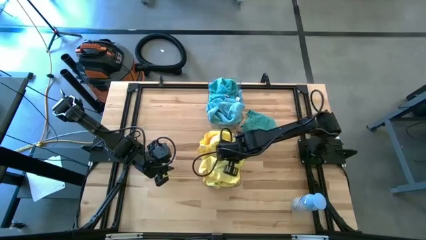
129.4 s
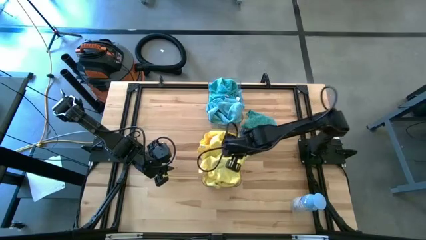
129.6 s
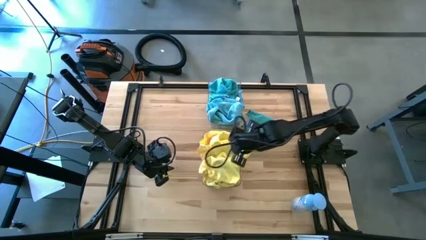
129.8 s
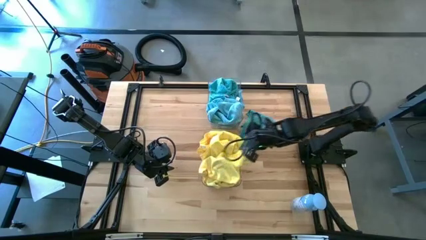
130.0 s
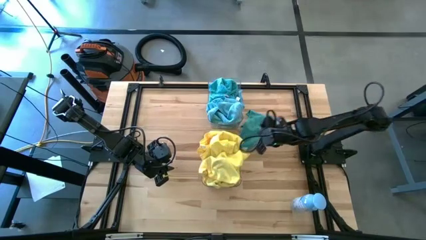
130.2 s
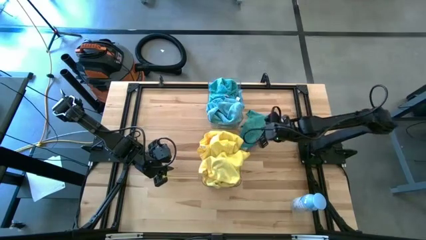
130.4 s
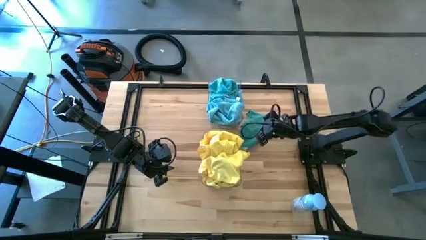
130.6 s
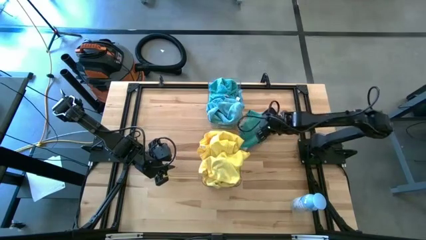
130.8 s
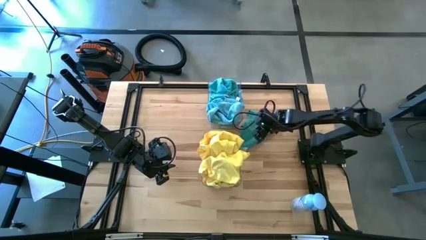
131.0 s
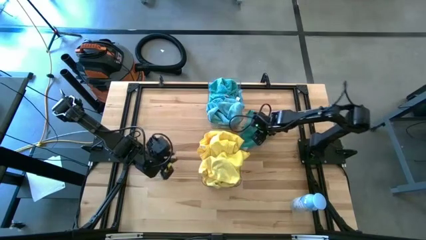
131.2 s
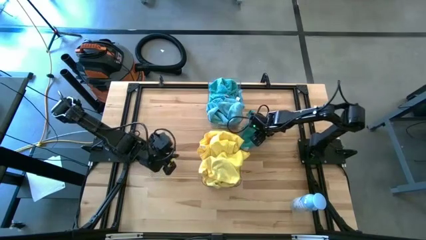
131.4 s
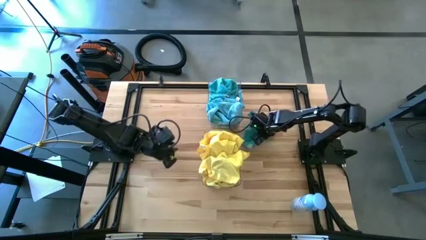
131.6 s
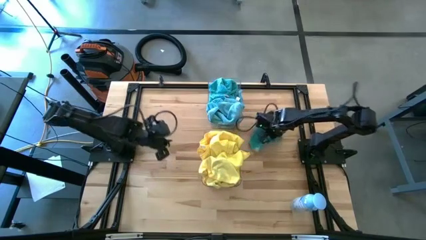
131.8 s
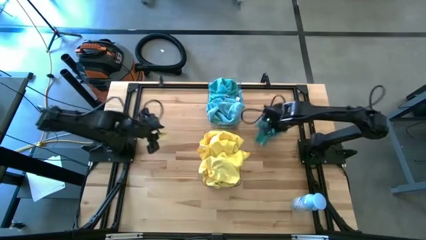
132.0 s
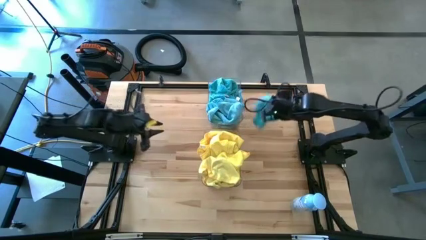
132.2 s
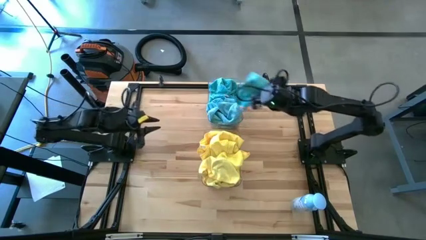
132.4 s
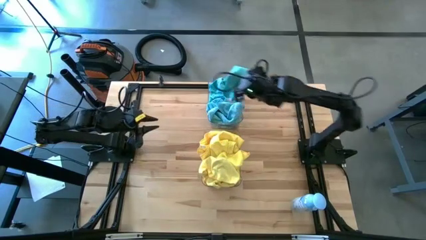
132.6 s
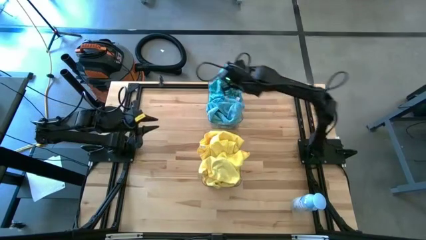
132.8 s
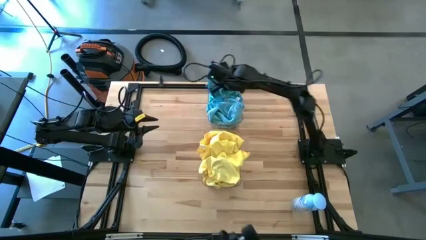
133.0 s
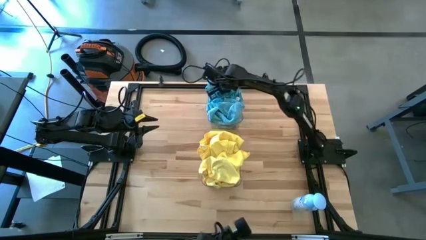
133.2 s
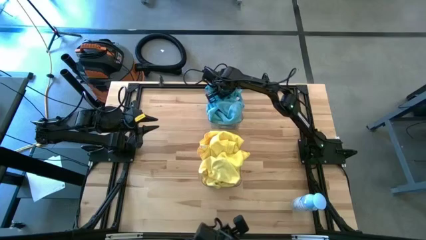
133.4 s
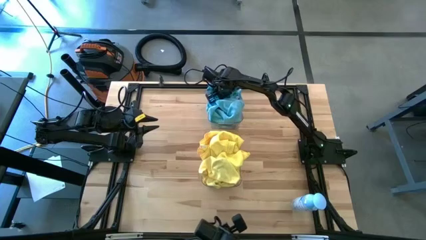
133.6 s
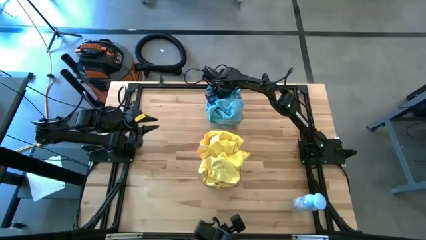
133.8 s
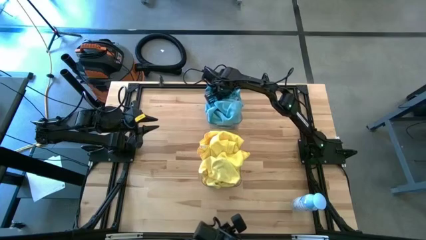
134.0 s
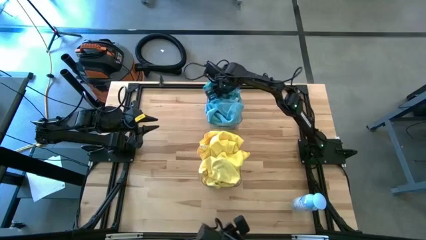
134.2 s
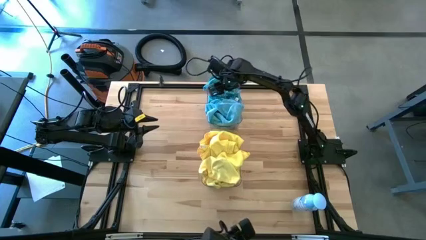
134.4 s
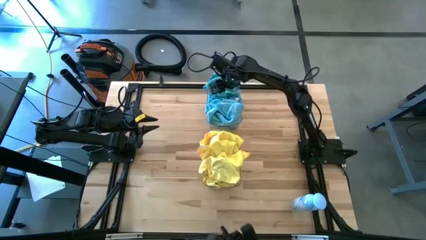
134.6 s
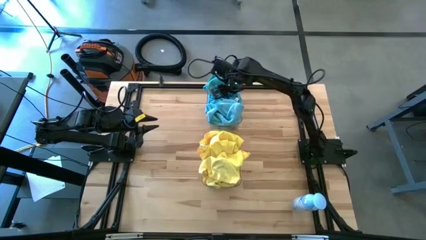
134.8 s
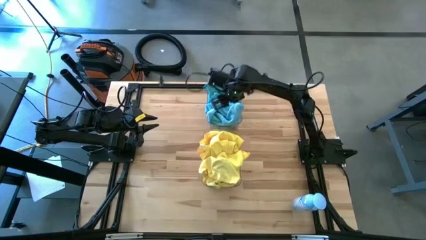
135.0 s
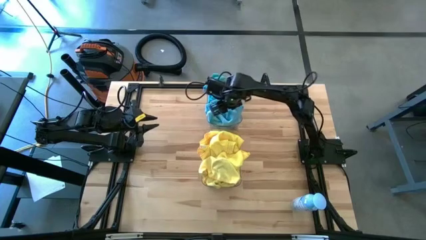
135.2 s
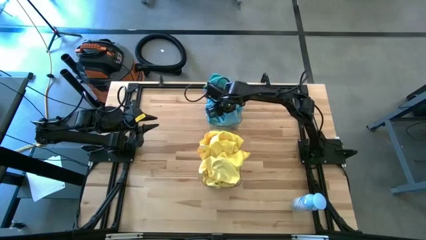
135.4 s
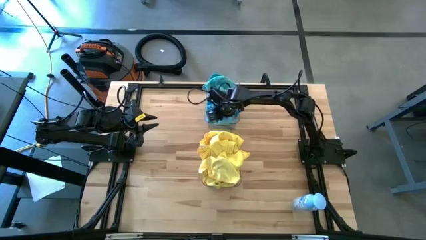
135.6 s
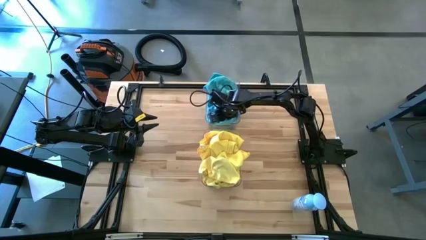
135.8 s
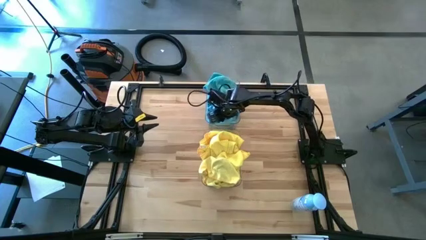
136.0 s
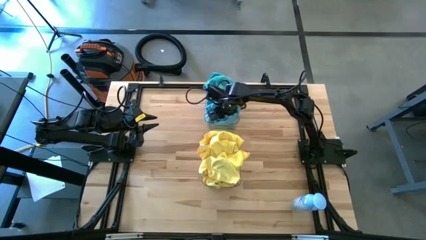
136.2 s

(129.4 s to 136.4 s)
Task: Sort microfiber towel by color & place in baskets
Put the blue towel into the top transparent bin

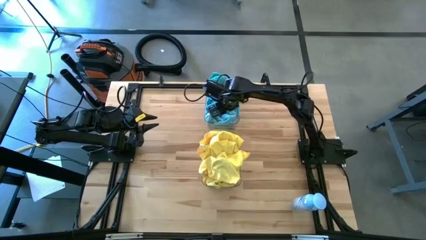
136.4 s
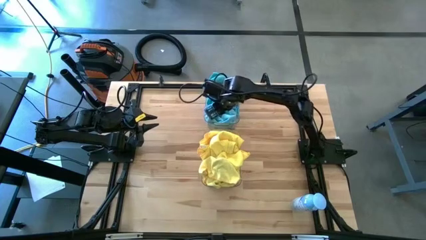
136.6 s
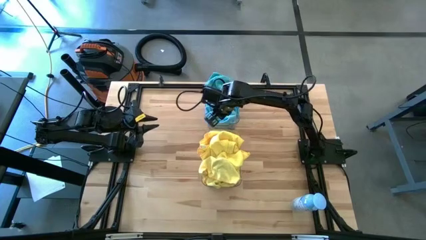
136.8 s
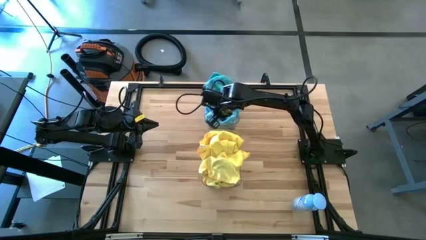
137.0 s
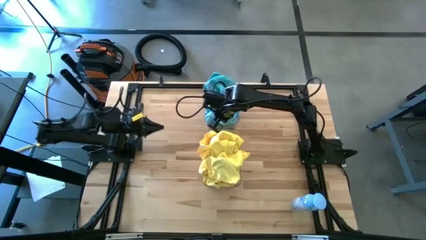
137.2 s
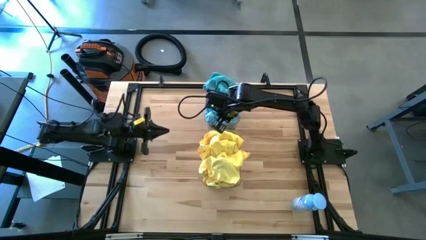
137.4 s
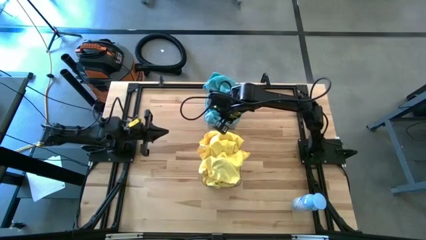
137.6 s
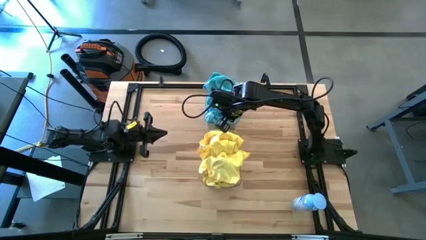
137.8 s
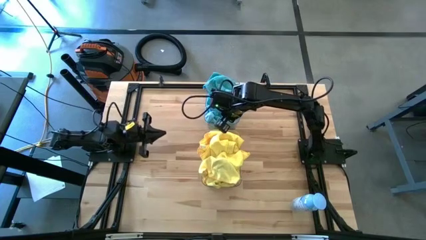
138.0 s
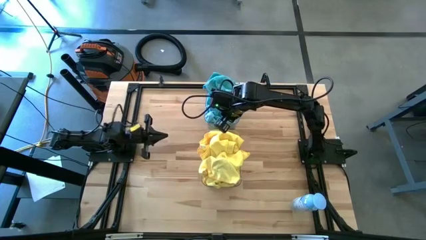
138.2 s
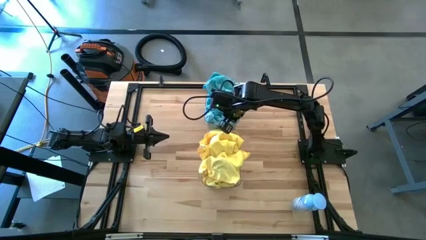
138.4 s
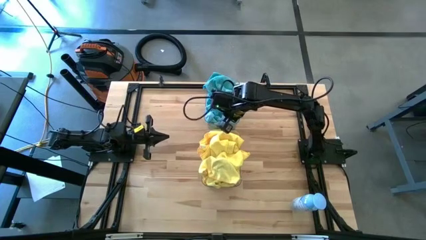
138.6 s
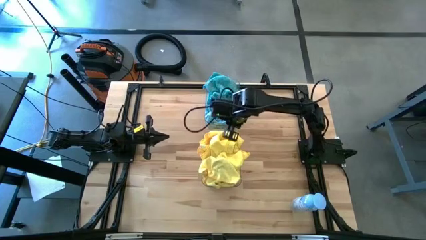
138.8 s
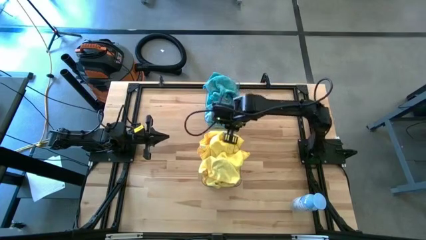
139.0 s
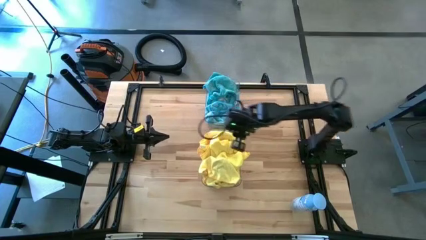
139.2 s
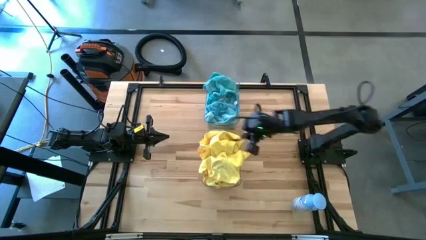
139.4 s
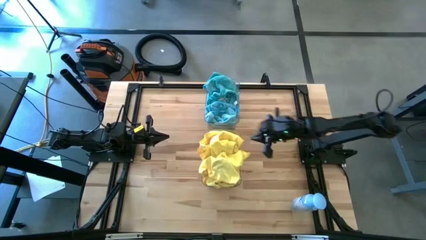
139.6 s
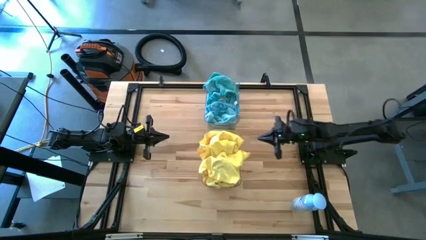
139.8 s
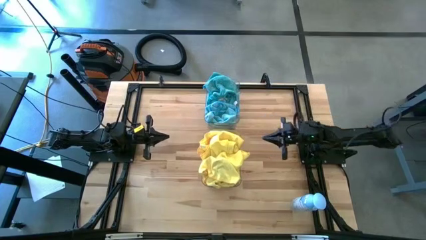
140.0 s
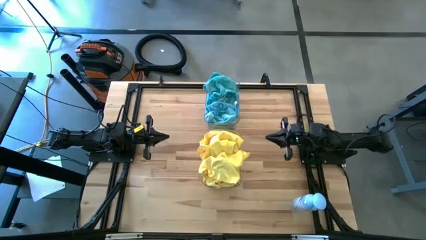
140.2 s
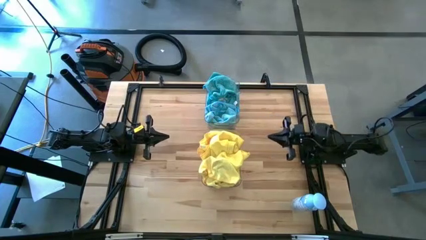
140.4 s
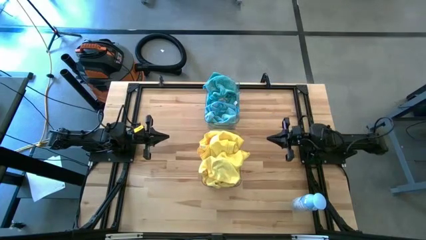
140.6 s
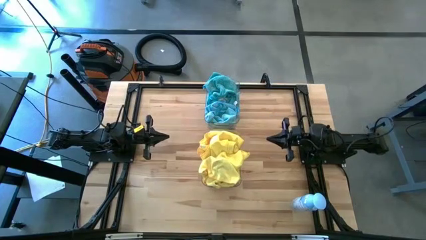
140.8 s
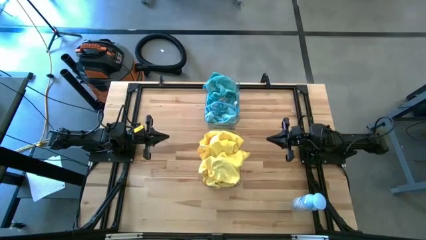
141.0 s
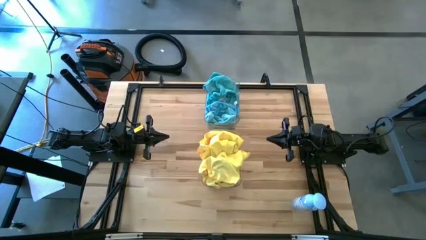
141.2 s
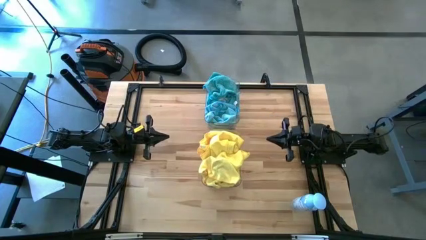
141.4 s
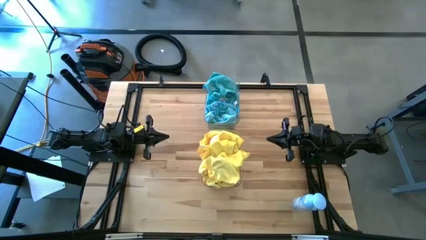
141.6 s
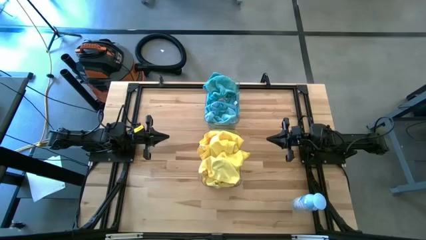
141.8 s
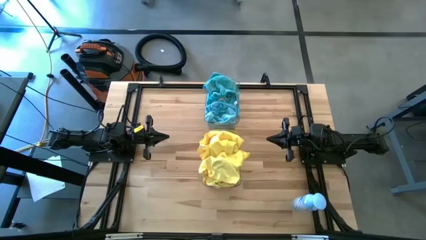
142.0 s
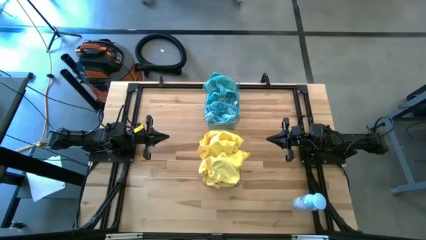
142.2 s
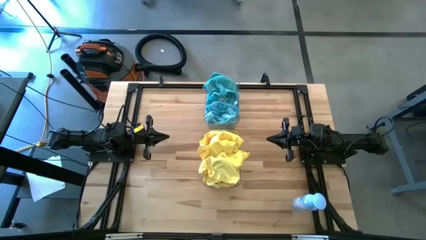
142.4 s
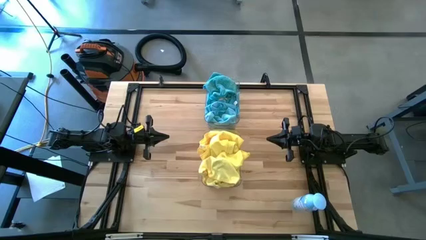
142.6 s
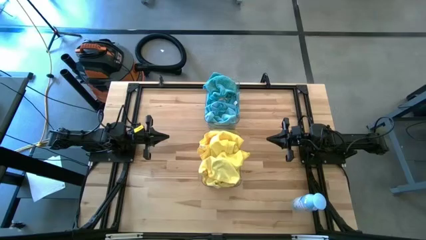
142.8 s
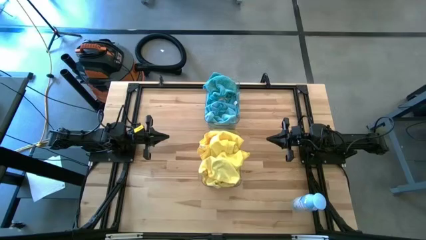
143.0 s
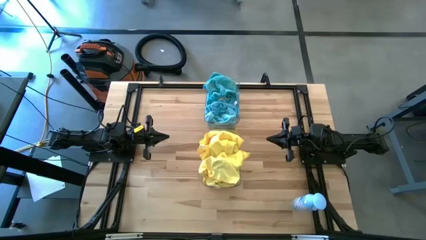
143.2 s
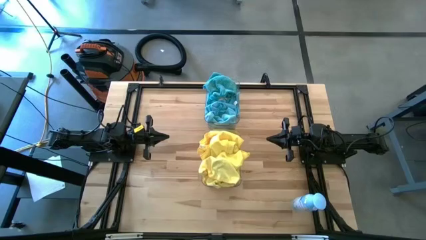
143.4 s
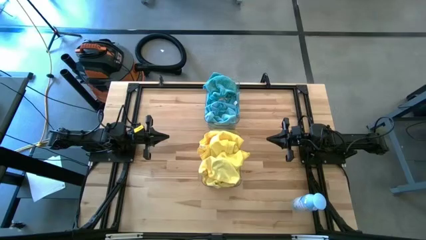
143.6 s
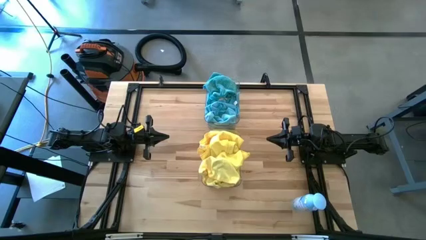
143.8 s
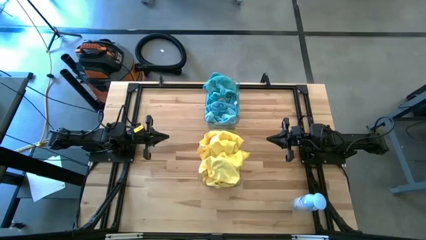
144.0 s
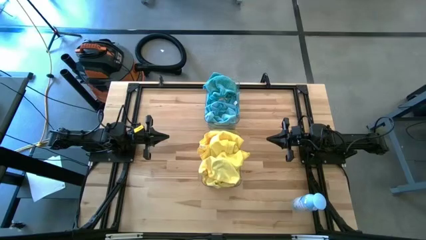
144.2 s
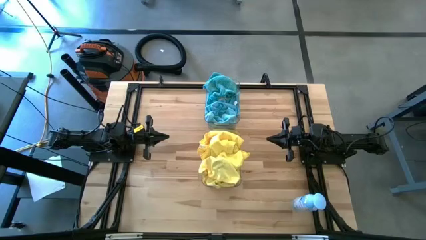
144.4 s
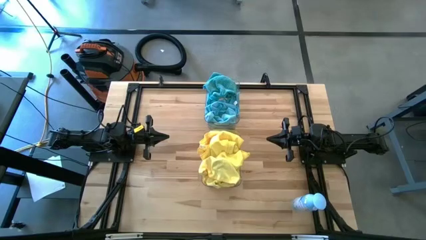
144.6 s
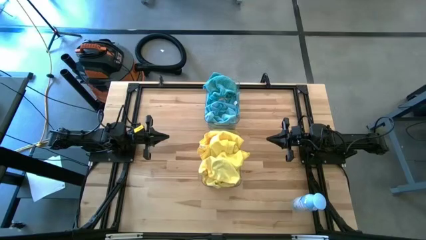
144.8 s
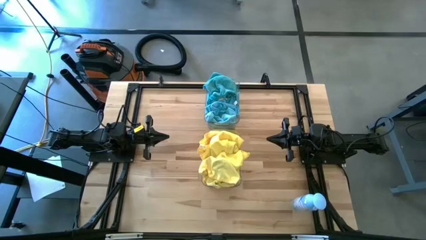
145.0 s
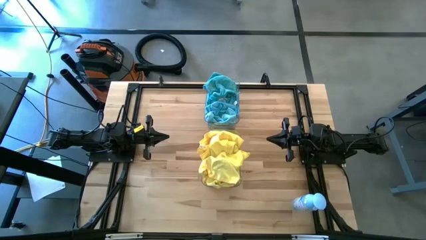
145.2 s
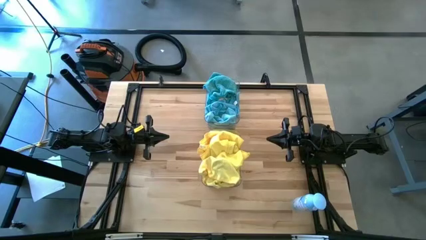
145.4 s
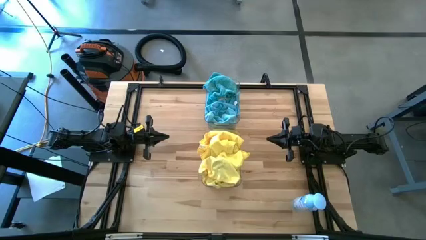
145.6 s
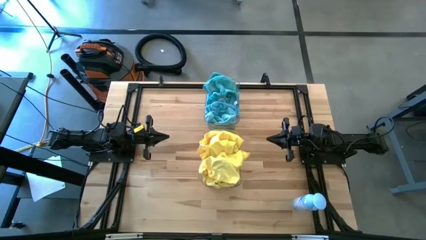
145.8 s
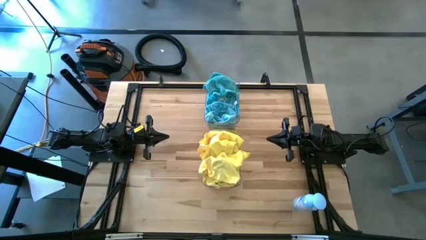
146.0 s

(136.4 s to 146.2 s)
Return to Home Position
